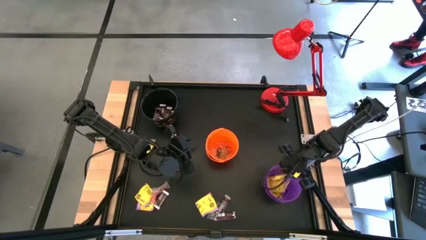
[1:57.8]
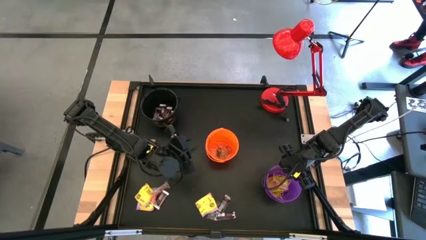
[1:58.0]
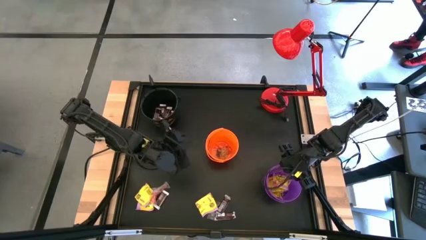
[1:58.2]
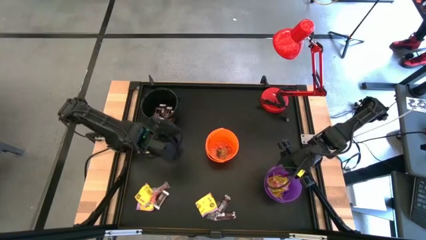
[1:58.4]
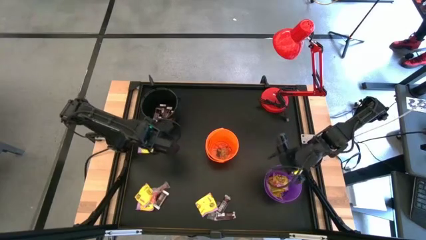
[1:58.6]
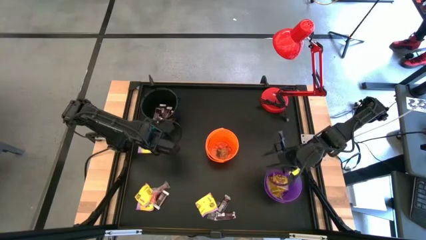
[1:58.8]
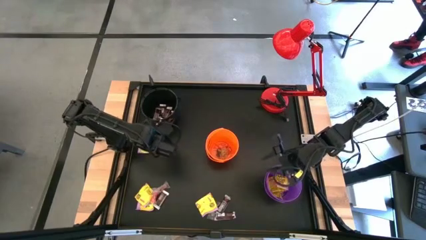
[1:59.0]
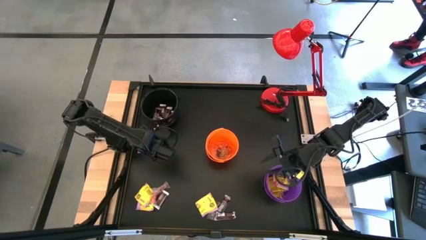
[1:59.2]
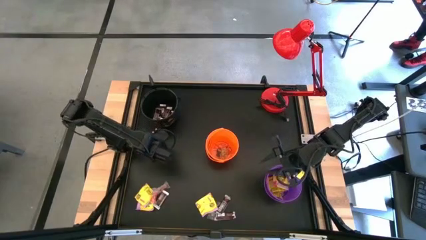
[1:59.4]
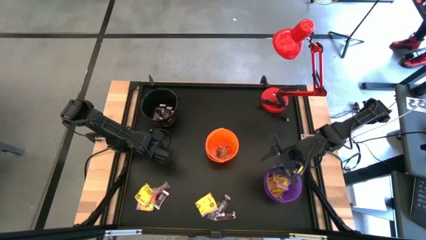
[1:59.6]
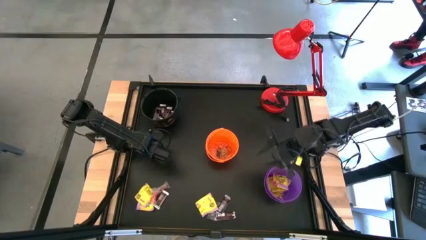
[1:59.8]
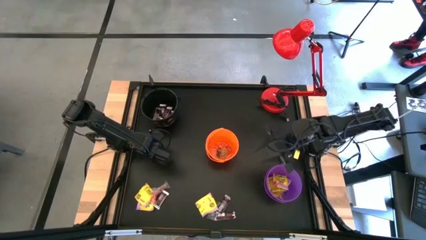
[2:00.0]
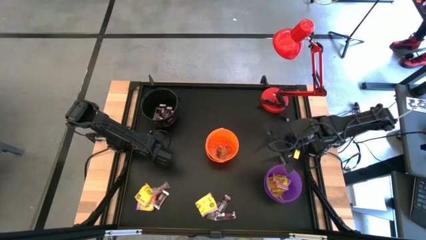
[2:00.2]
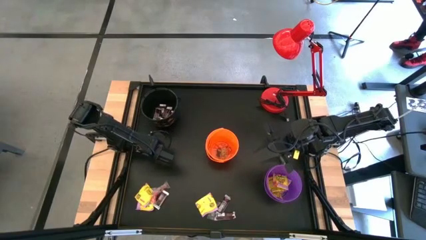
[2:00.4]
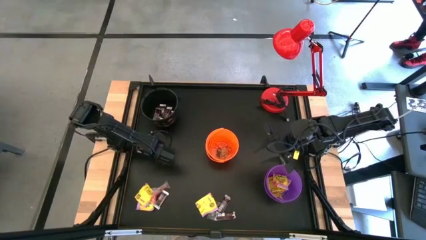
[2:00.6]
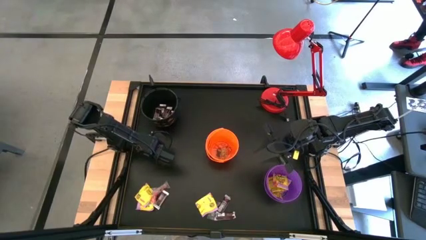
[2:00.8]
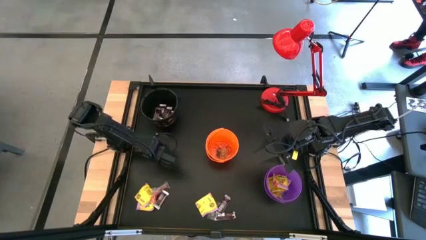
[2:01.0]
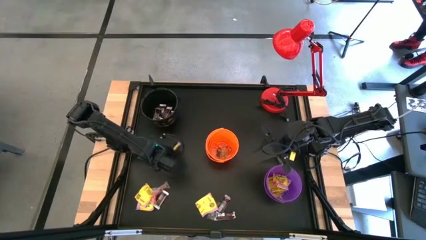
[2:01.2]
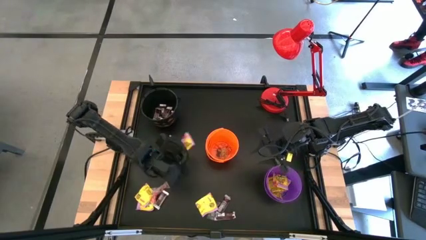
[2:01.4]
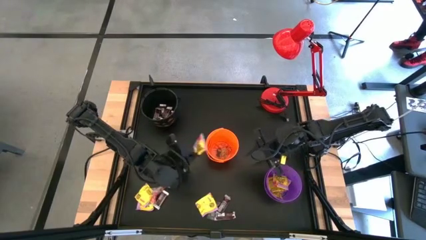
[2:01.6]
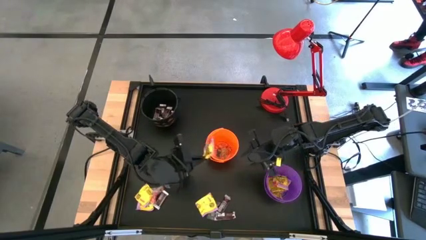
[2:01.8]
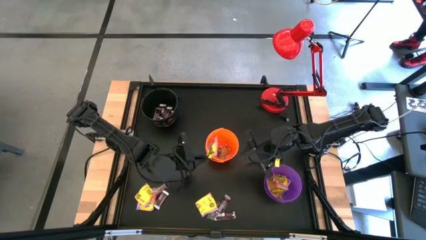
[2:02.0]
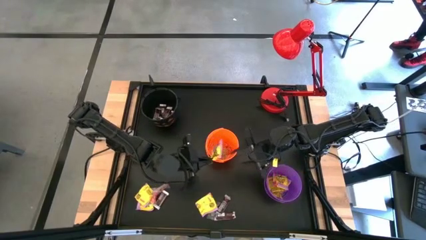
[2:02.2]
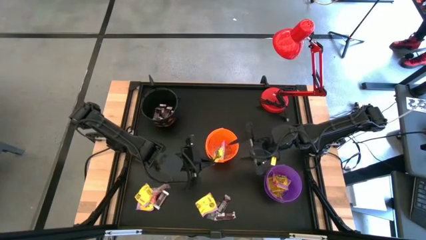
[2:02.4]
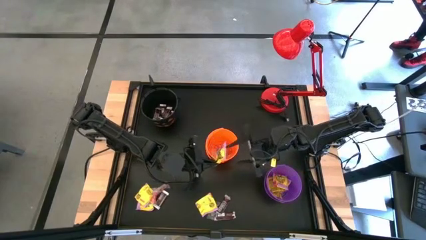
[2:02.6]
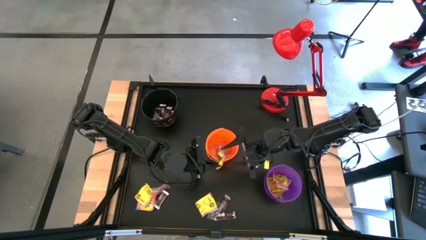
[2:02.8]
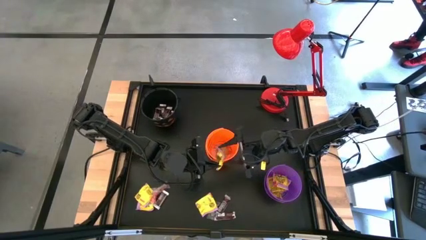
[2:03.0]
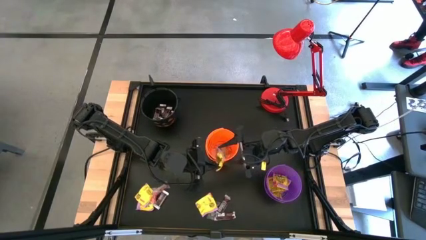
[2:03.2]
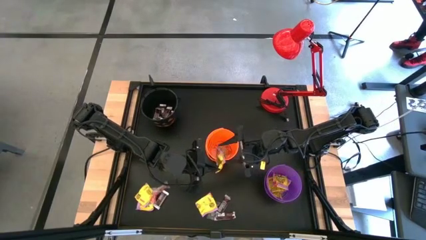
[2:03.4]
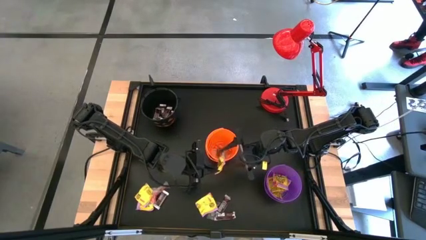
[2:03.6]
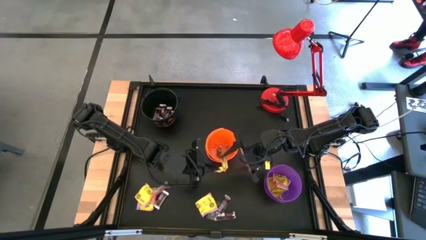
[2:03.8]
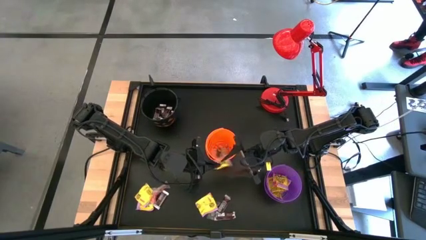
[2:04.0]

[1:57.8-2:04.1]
Task: Sort candy
Put the yellow candy into the purple bucket

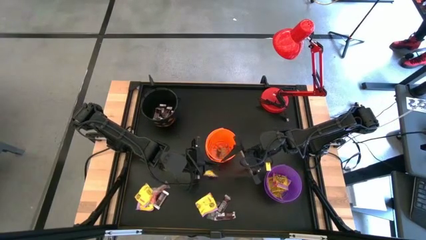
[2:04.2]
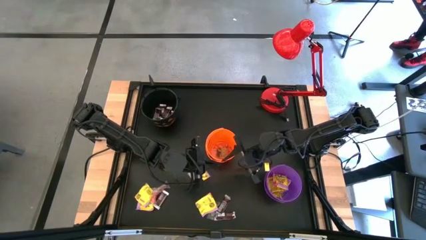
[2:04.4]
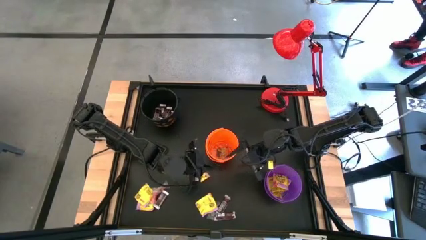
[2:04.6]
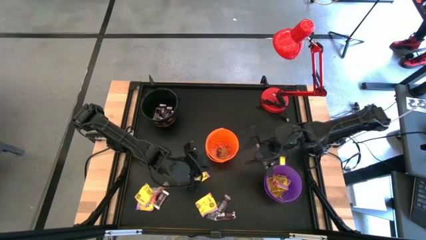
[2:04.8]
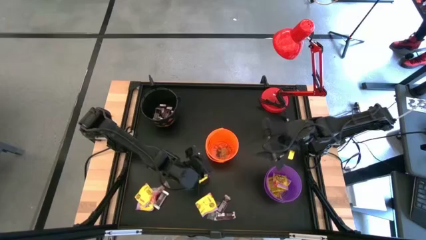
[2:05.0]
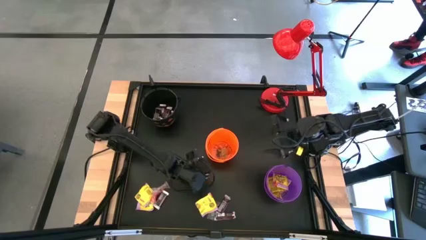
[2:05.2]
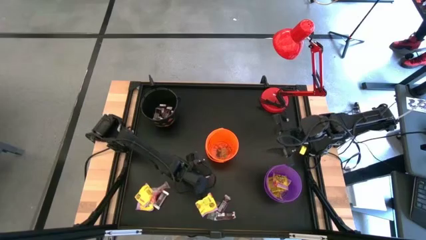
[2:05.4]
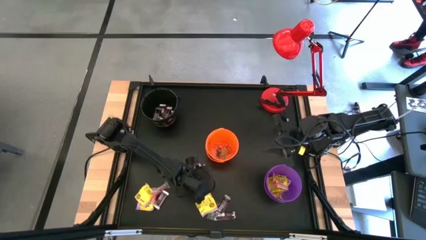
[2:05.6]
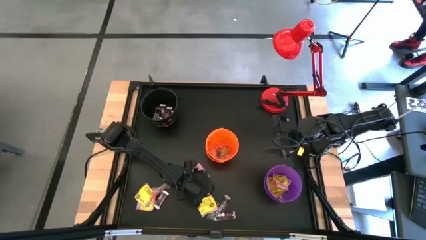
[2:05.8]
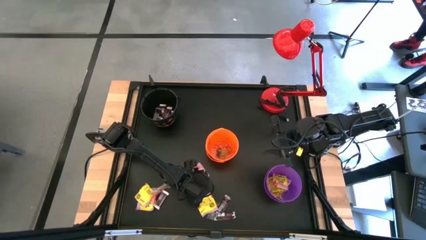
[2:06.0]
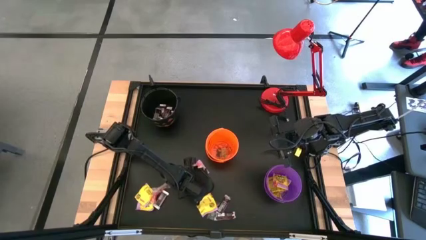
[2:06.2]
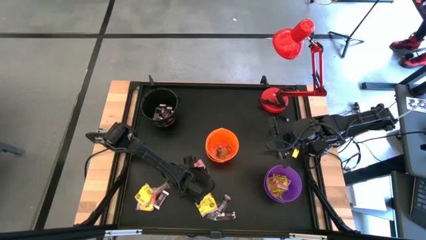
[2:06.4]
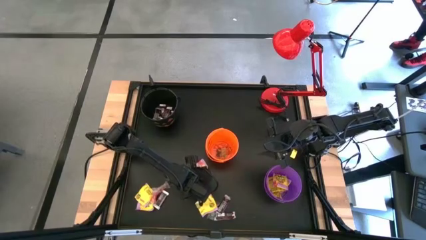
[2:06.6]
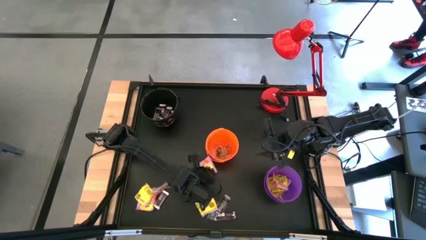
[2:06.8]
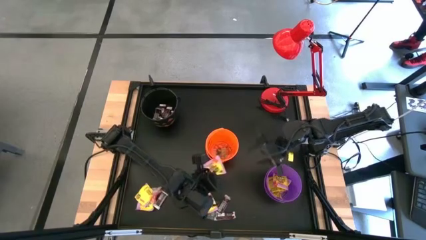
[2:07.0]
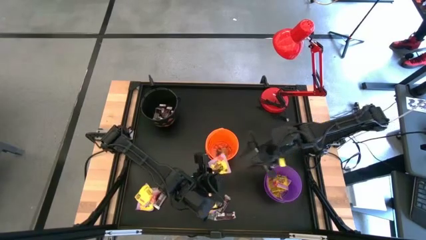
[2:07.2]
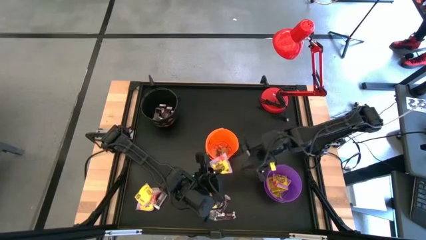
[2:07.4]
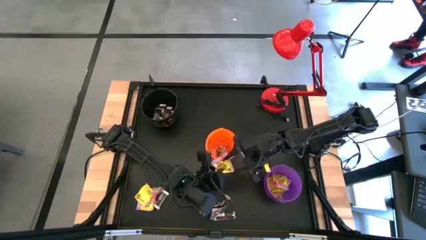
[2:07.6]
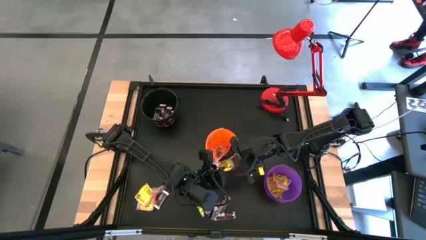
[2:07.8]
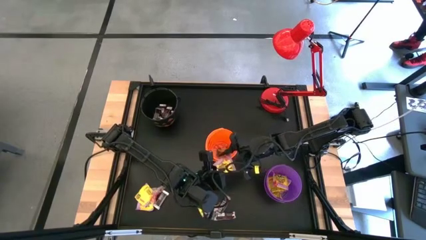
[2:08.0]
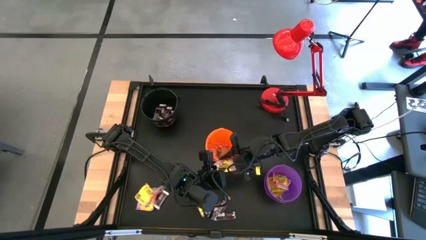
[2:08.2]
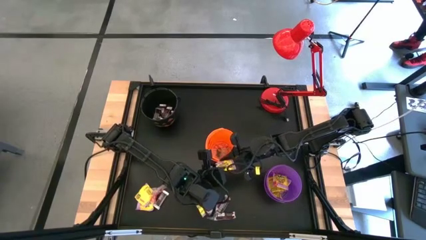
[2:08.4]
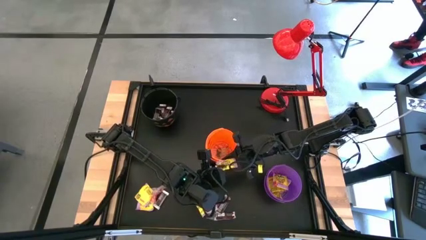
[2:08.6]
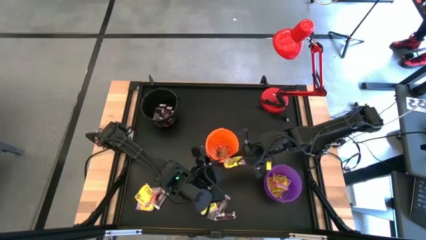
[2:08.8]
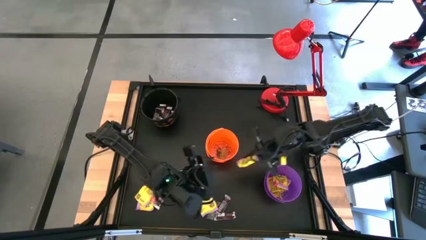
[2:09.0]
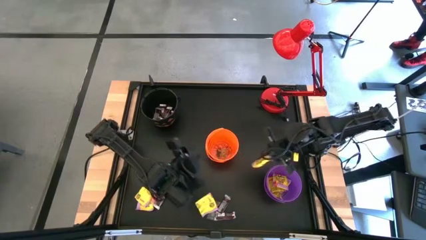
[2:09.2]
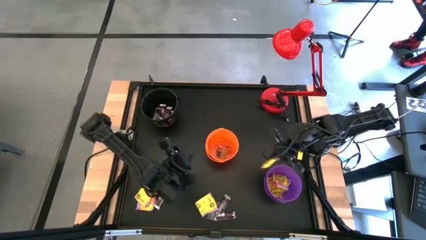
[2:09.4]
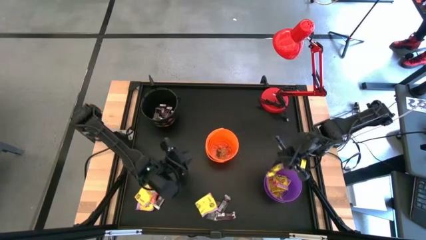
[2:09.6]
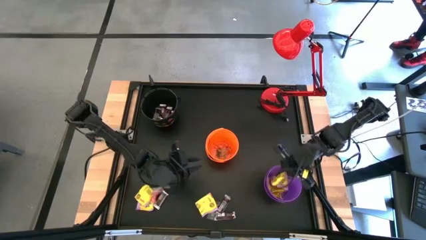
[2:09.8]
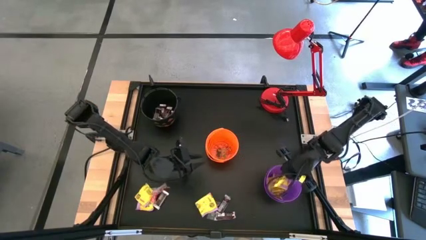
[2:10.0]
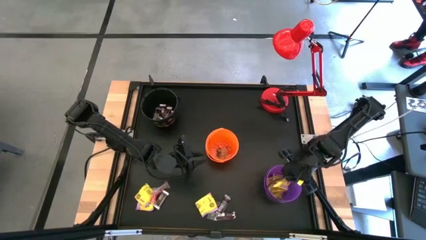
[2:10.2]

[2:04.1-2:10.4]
Put the yellow candy into the purple bucket

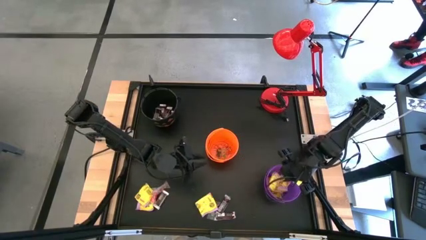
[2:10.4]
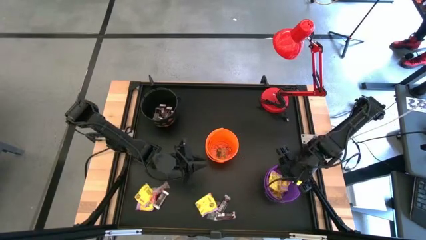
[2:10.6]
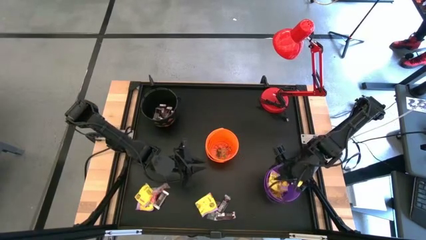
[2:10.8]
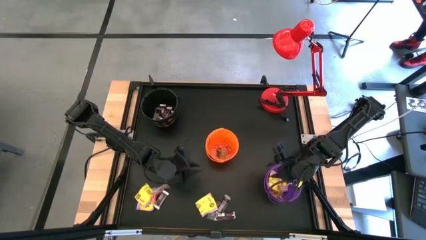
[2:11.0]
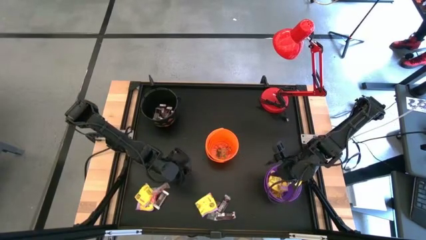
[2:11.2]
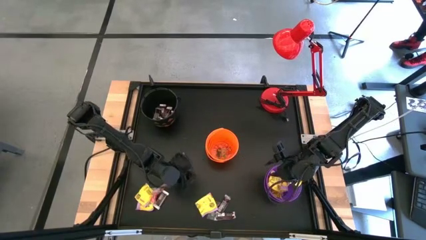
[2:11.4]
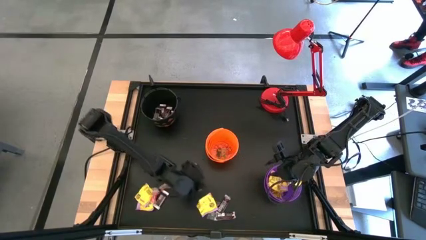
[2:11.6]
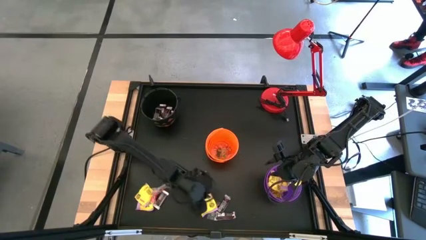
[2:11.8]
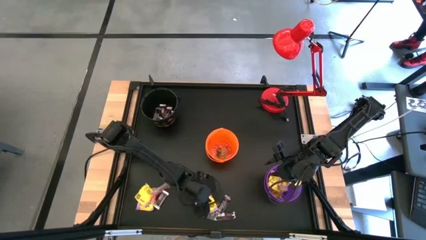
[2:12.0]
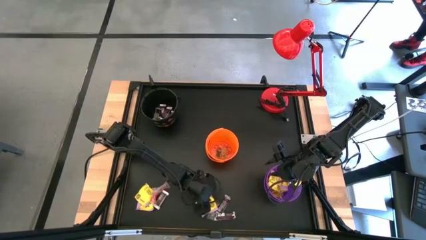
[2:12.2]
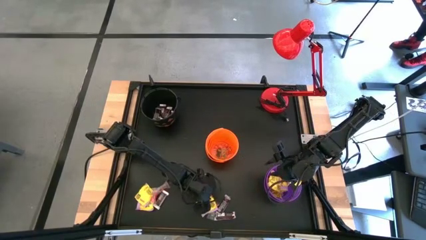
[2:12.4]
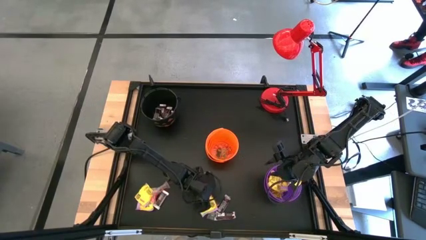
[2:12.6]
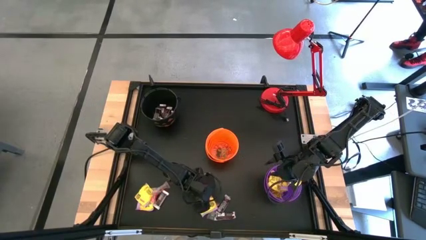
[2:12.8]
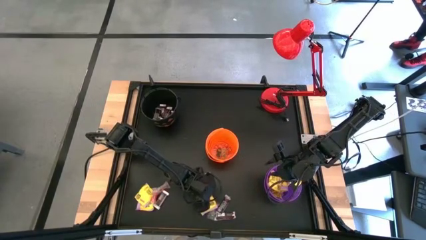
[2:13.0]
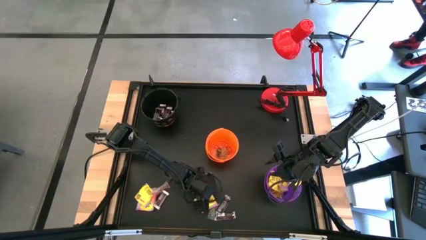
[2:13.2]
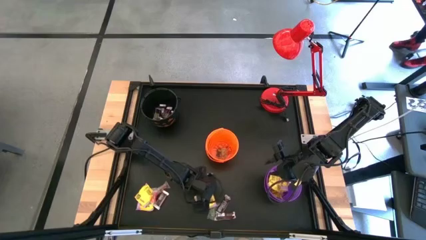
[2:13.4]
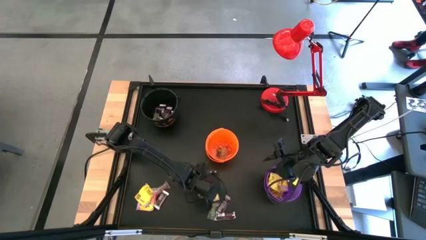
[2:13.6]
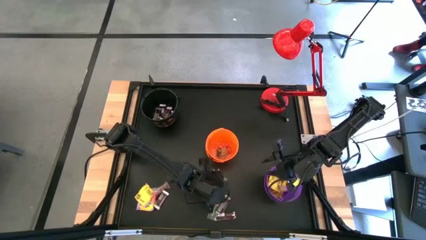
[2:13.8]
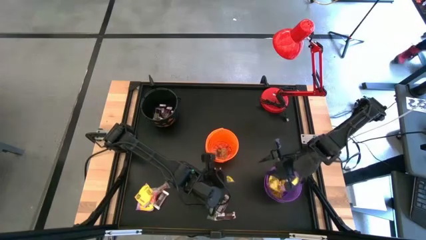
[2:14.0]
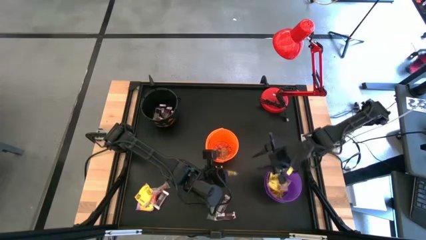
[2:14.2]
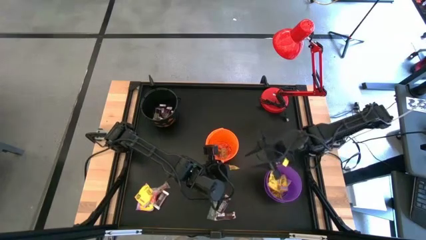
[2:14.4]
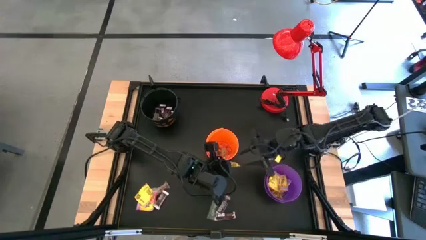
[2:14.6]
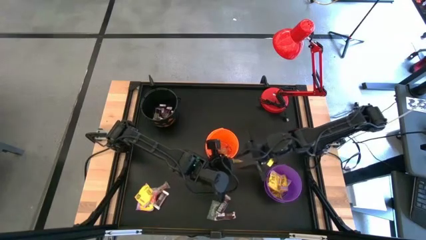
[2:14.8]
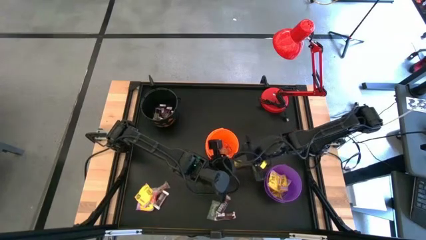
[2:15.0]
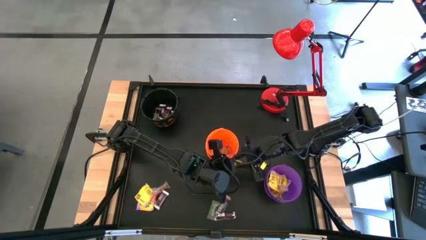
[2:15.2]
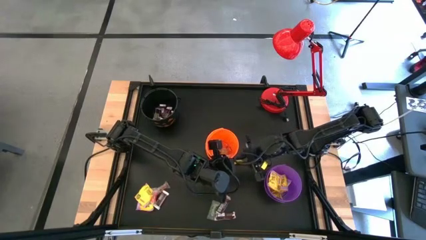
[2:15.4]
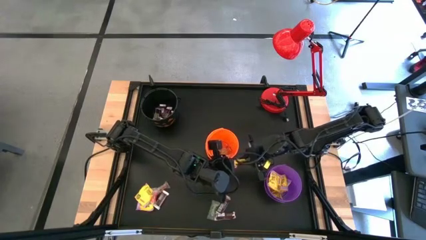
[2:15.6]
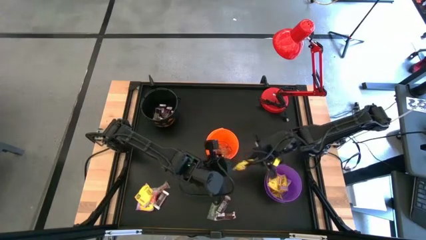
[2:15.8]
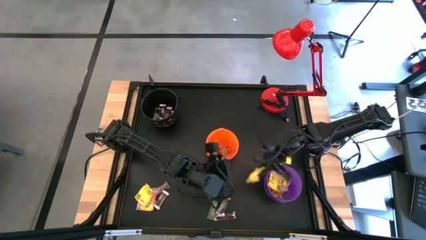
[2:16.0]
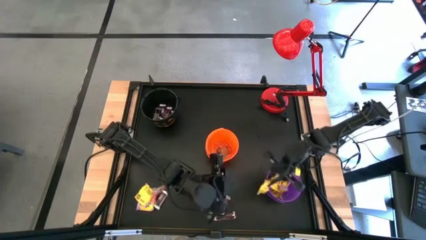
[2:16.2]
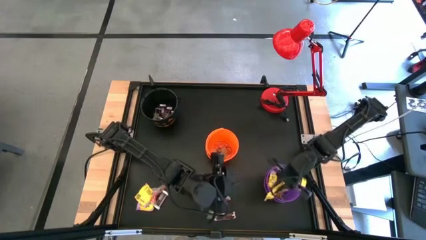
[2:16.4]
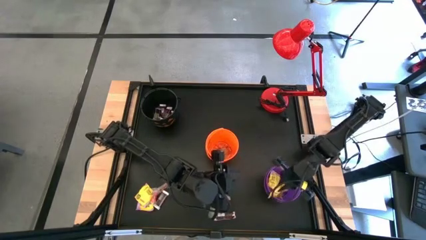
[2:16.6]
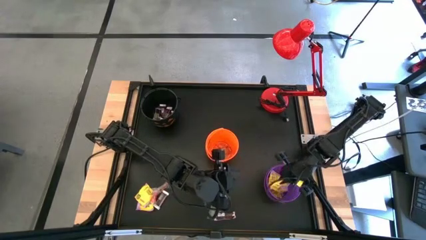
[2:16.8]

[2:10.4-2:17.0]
Put the yellow candy into the purple bucket
